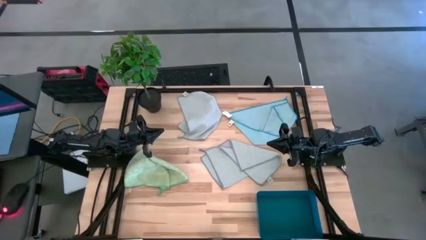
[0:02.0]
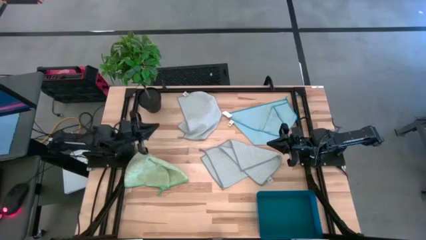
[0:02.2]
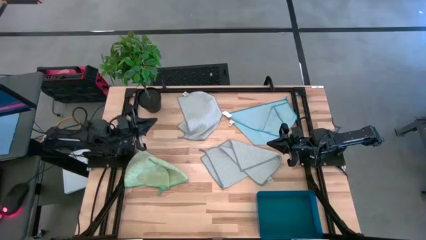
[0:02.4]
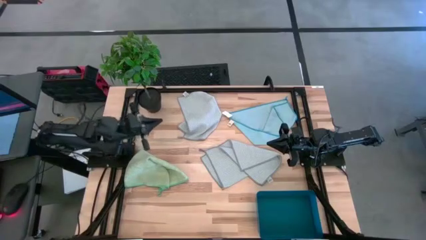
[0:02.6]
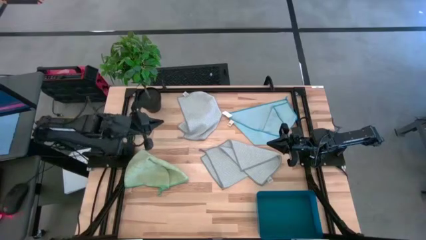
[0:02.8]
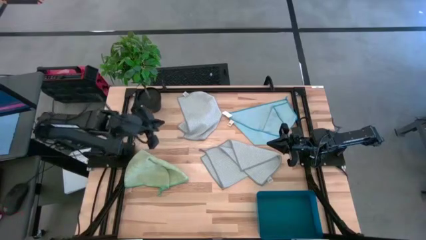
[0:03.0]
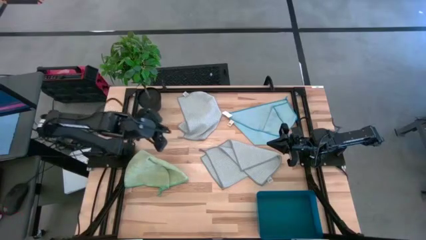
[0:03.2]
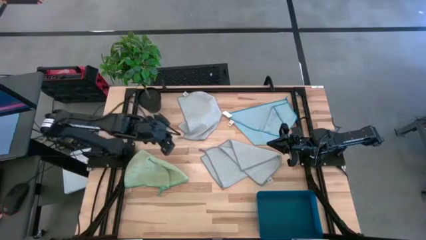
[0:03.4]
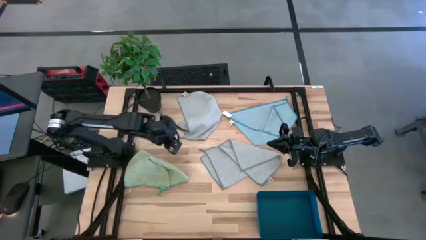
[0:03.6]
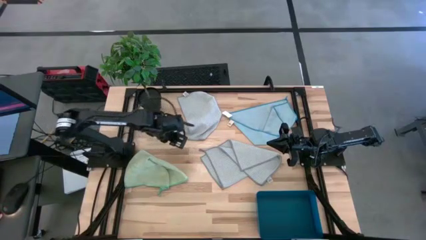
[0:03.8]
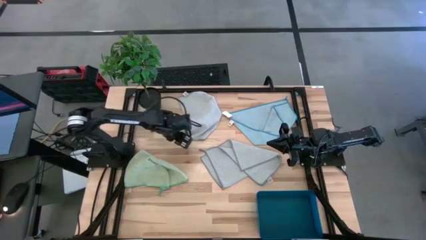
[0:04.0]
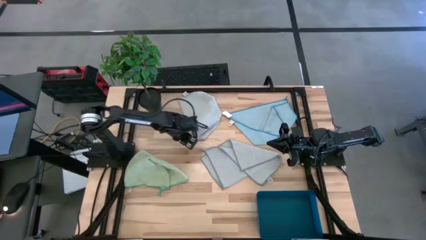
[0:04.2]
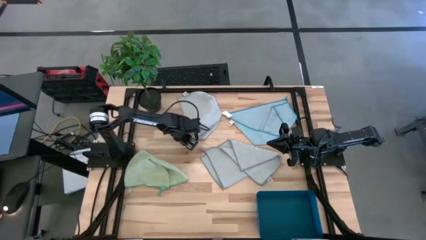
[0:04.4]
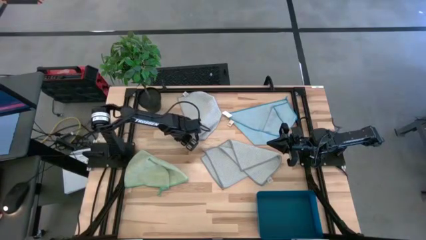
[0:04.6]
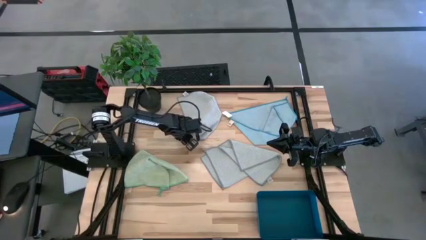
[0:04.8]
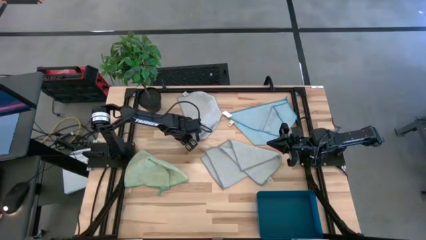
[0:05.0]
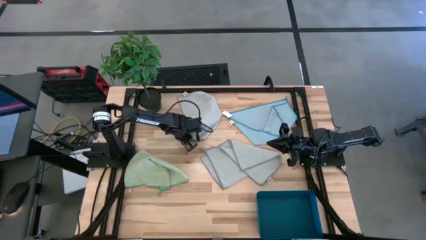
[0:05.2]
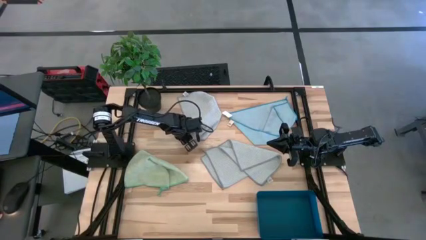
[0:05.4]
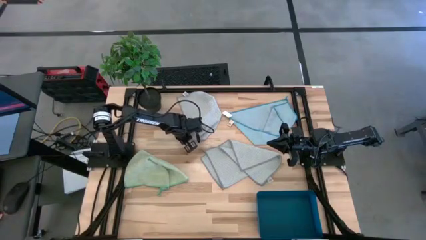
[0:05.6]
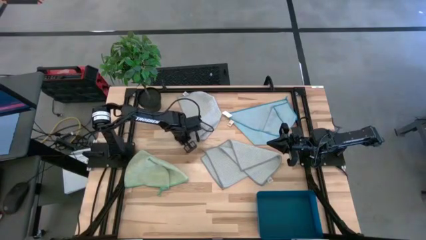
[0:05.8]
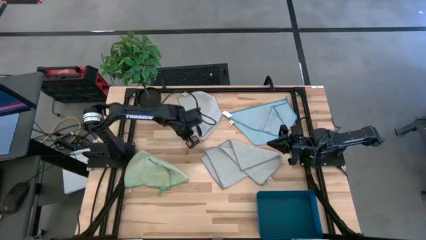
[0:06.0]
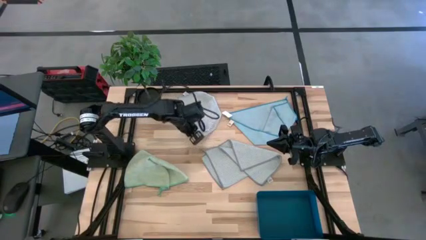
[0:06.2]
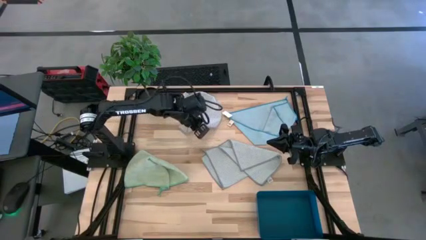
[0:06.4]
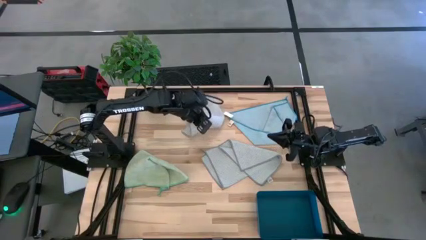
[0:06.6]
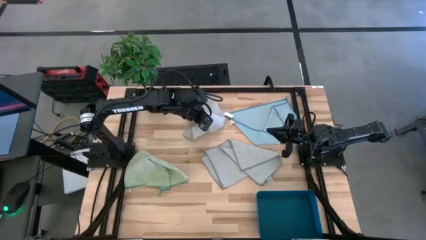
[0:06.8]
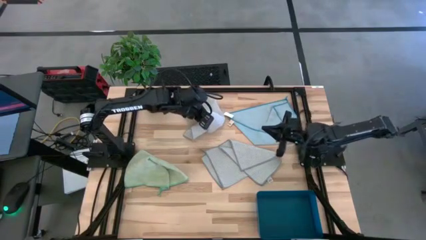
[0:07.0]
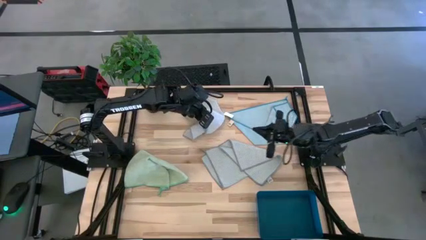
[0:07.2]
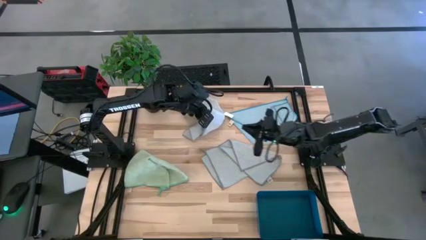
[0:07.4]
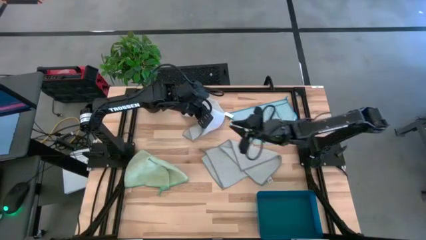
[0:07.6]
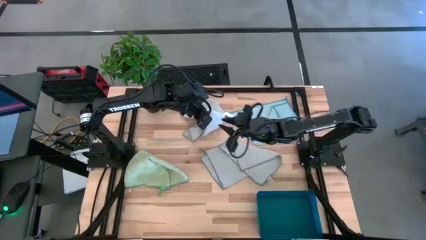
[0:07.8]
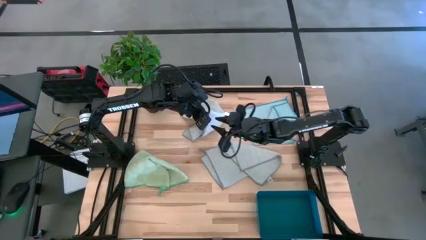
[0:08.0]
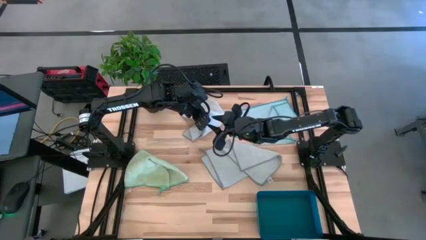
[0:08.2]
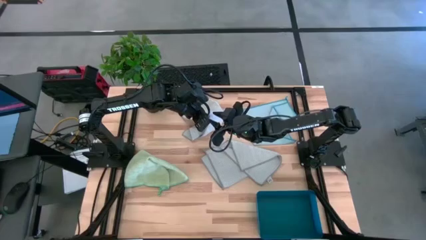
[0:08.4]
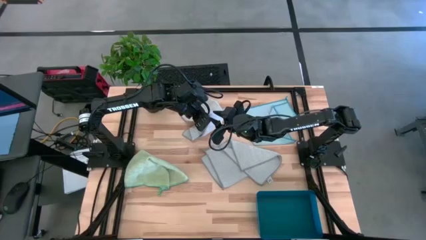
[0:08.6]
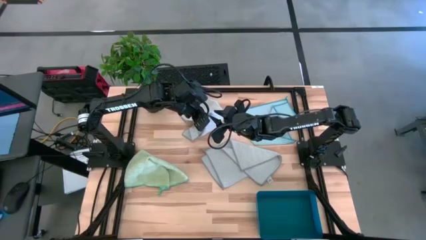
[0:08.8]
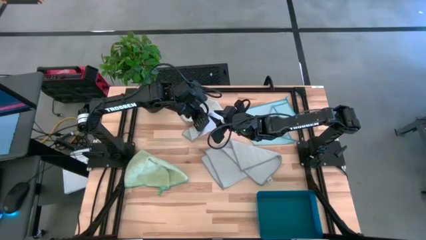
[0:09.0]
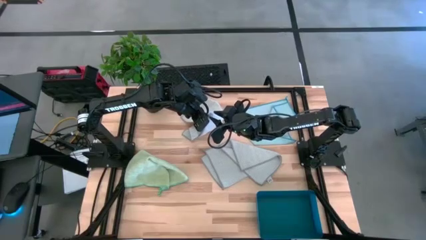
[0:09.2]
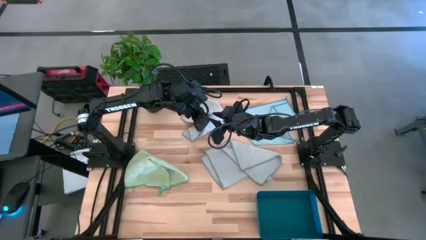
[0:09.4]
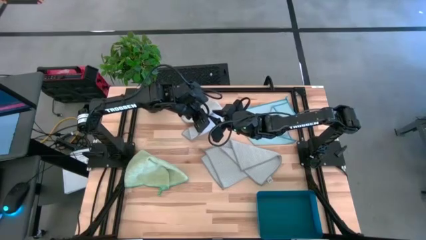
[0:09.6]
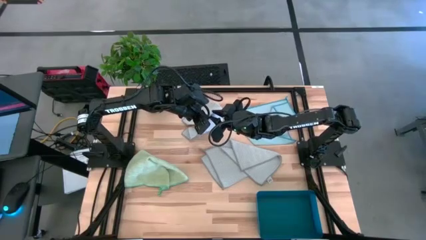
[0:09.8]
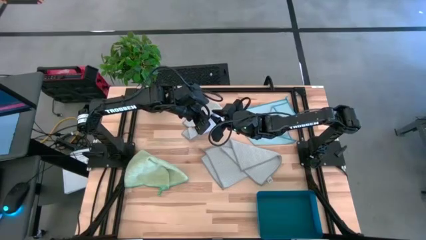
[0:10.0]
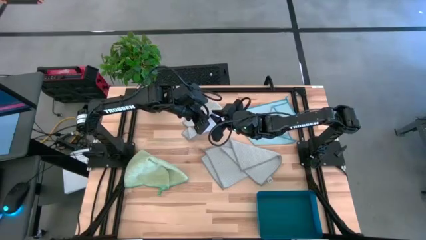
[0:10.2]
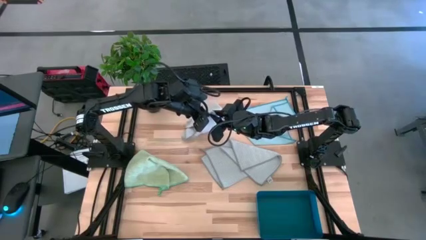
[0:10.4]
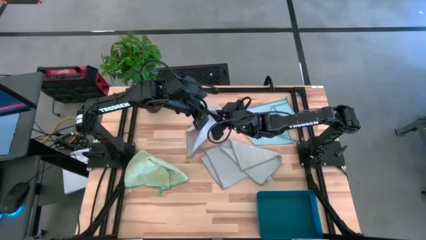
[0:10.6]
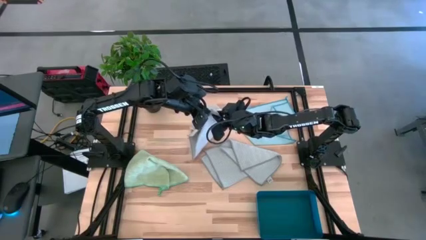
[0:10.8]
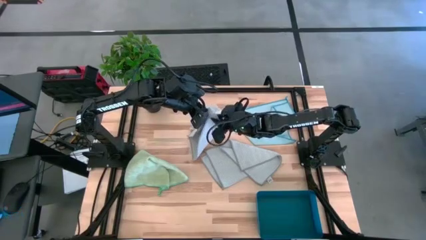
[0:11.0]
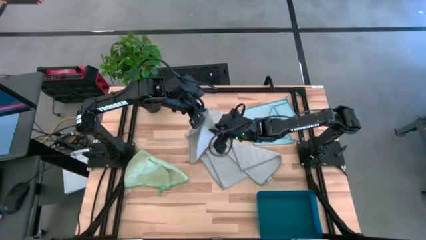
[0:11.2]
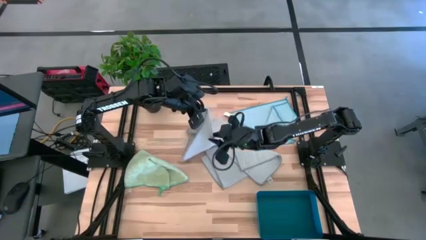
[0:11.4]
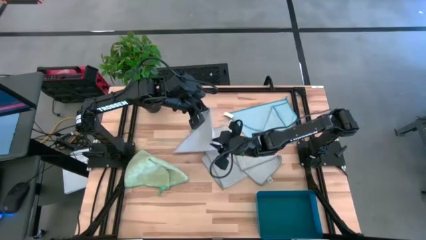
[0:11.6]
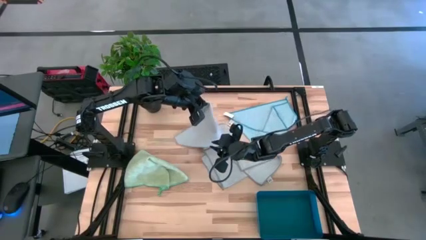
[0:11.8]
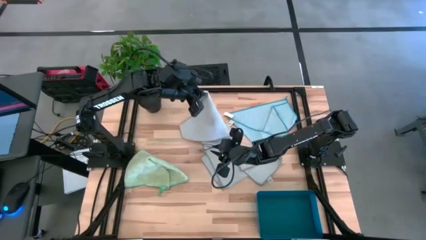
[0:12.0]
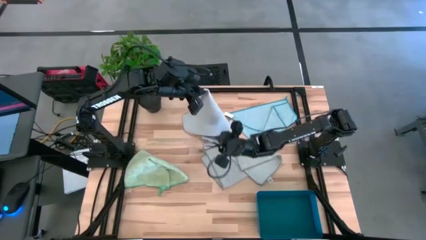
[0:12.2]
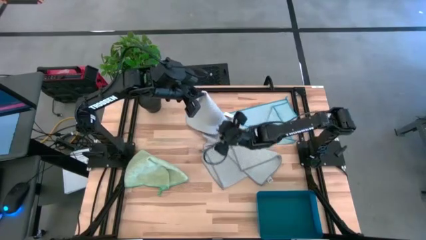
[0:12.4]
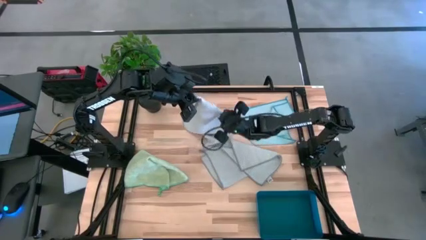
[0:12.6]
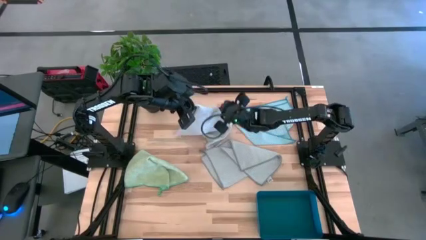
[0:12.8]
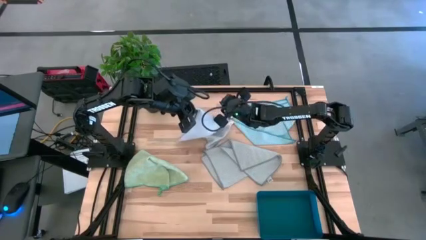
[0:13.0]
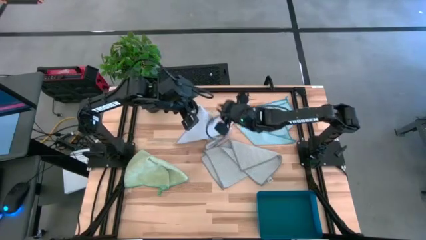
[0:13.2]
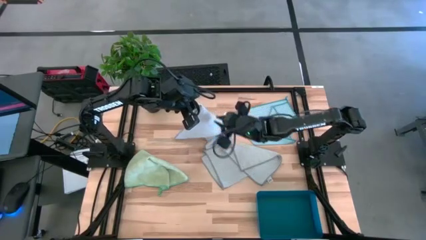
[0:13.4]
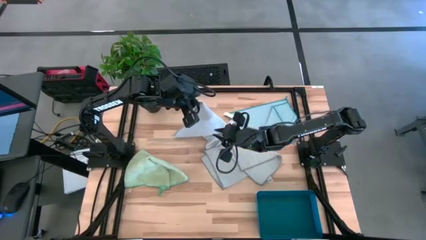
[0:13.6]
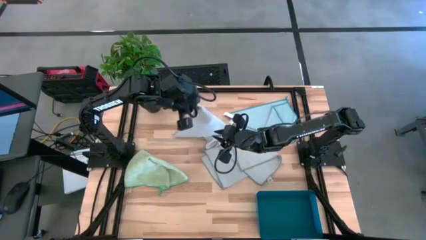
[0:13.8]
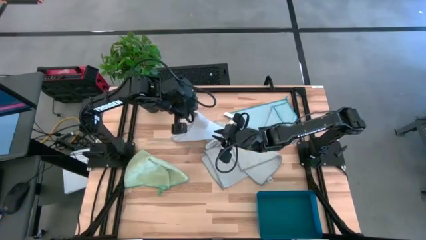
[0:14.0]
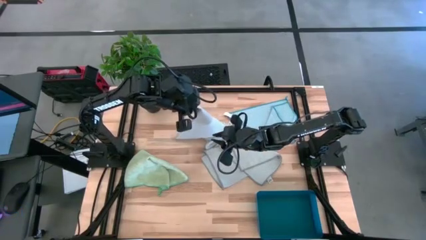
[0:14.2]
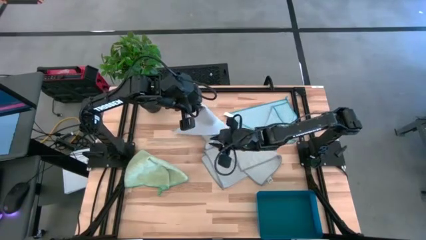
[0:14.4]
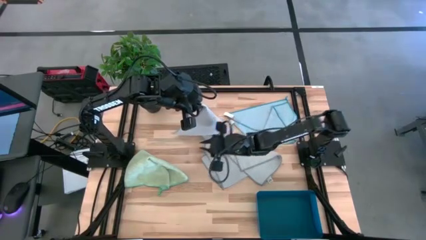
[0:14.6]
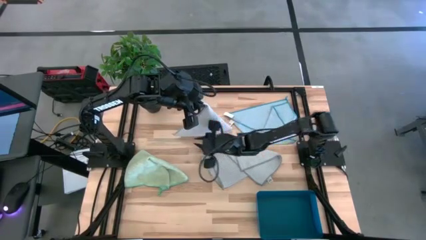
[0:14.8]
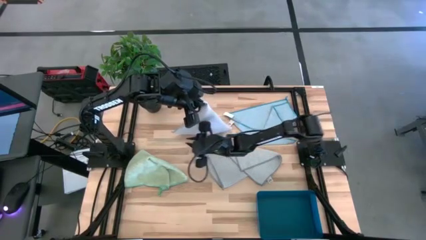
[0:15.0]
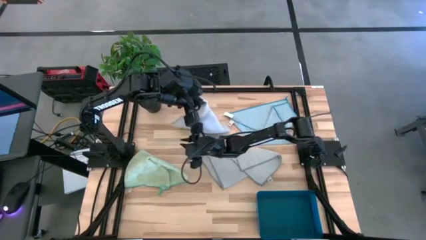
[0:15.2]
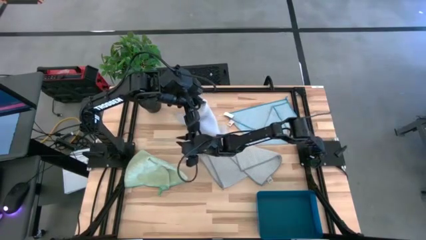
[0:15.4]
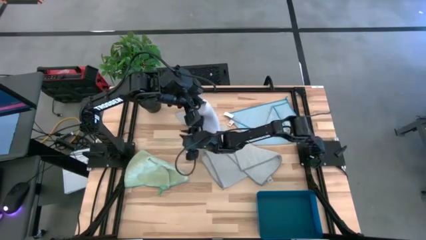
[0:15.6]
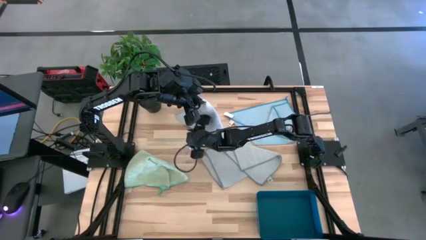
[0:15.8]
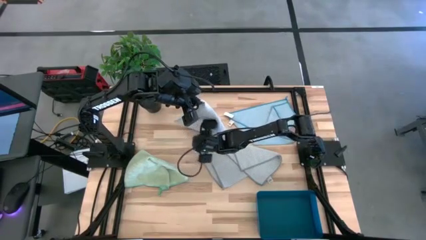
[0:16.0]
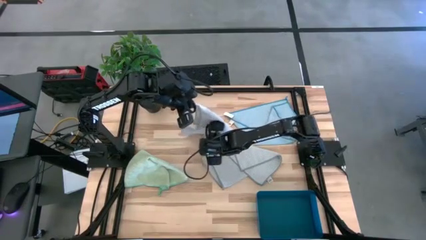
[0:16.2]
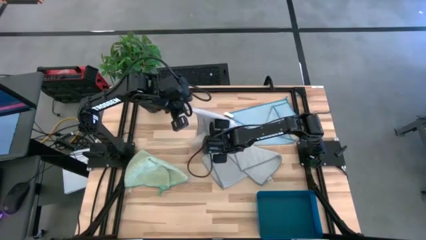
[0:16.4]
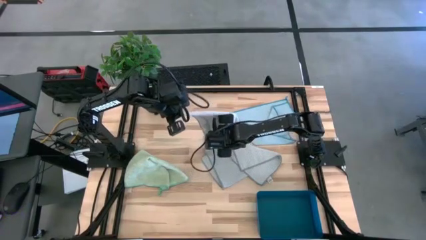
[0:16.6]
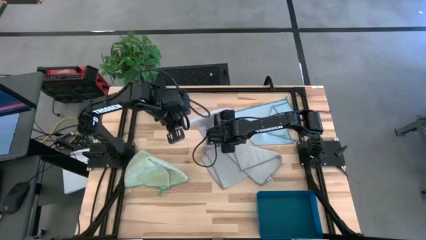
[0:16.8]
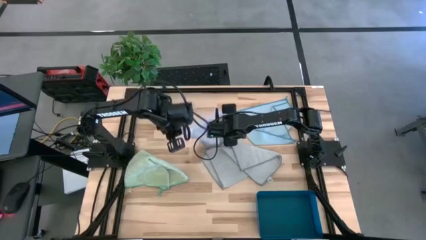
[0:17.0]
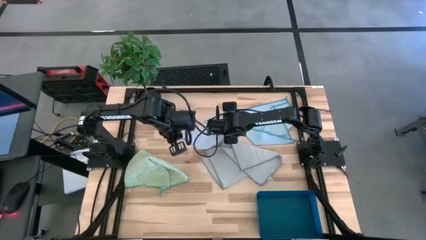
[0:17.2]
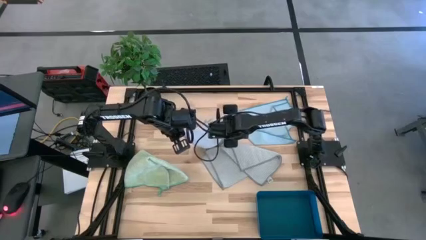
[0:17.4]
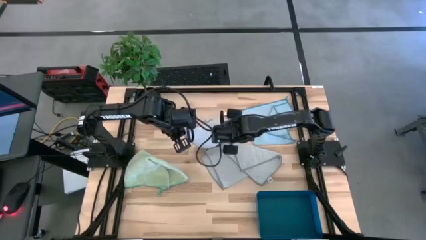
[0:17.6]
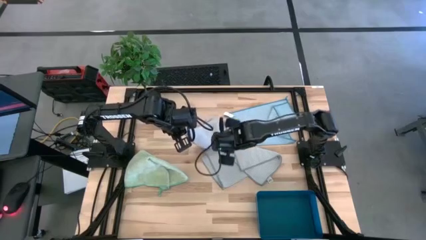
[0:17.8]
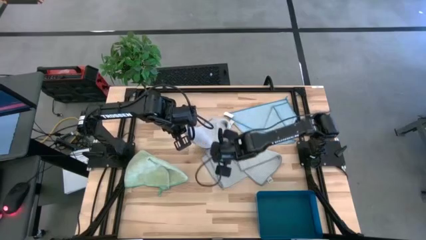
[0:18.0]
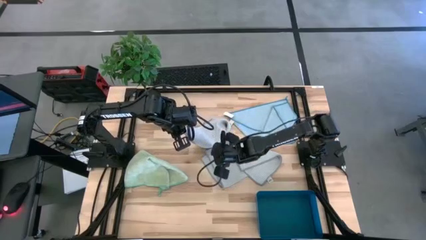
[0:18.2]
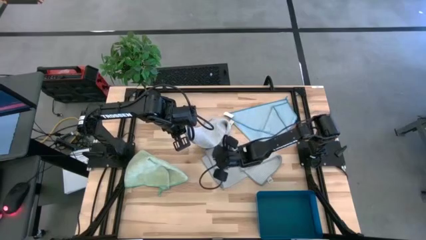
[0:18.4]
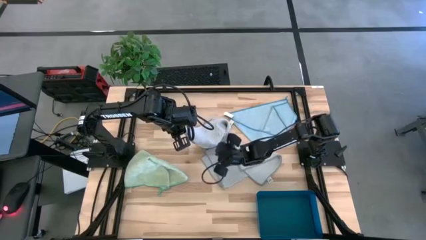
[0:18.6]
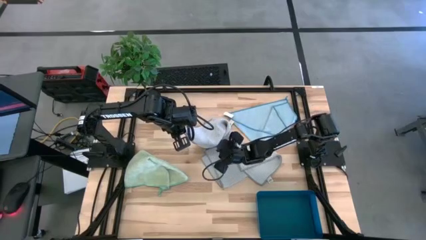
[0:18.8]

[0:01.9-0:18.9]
Task: Fold microfiber towels
Fold the gray microfiber cloth
